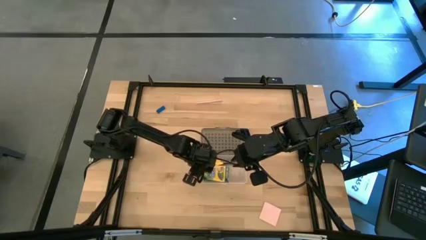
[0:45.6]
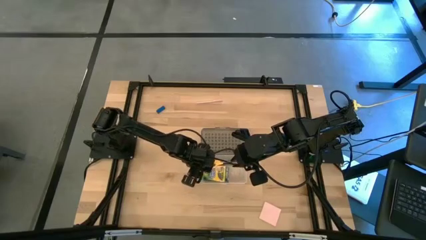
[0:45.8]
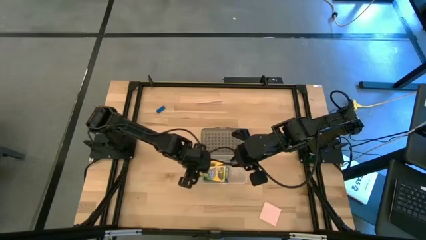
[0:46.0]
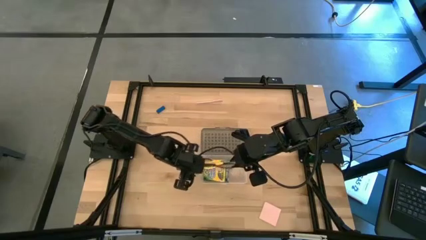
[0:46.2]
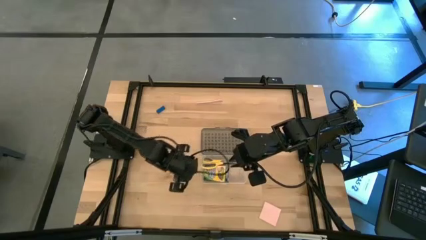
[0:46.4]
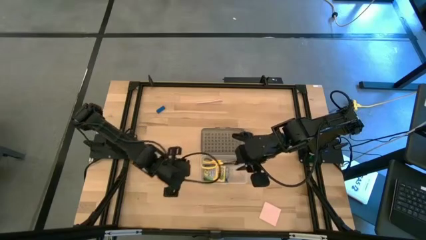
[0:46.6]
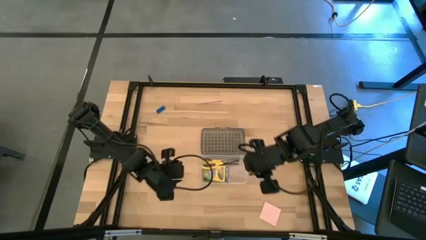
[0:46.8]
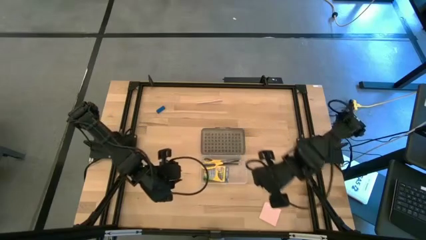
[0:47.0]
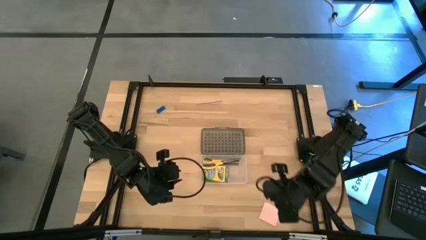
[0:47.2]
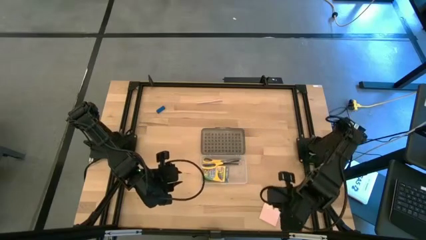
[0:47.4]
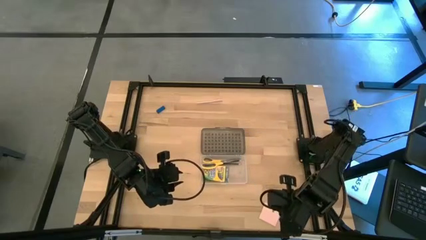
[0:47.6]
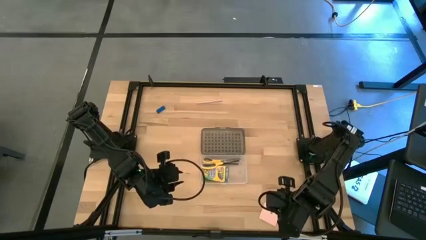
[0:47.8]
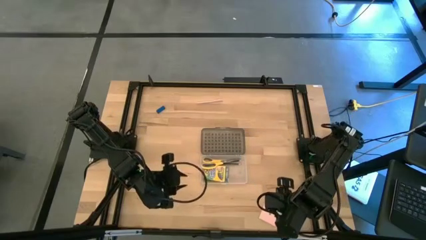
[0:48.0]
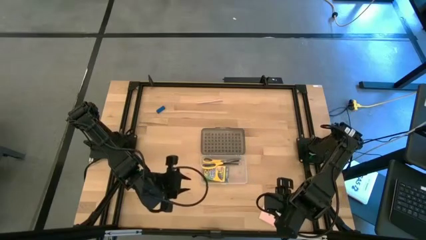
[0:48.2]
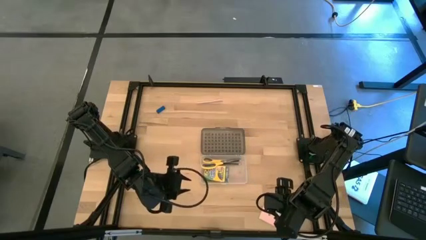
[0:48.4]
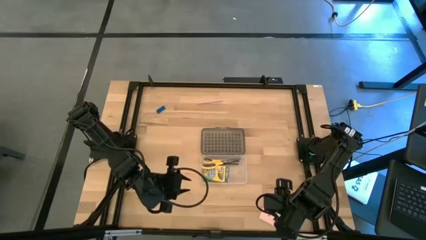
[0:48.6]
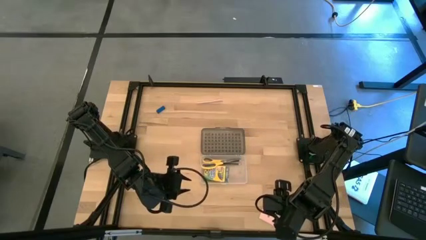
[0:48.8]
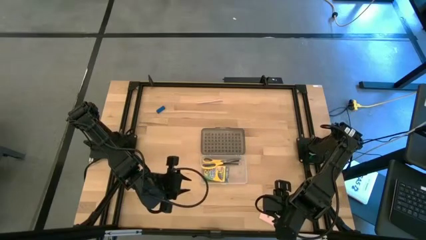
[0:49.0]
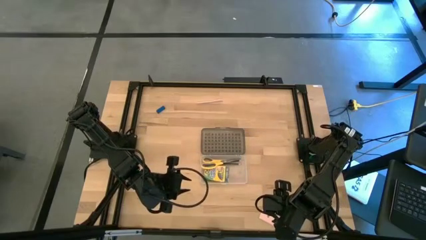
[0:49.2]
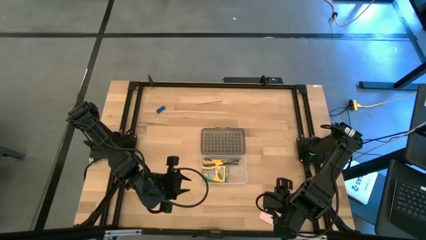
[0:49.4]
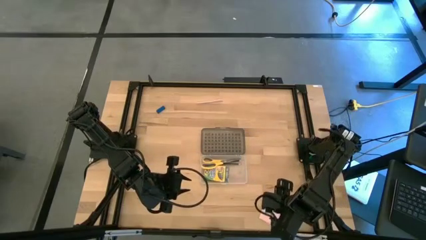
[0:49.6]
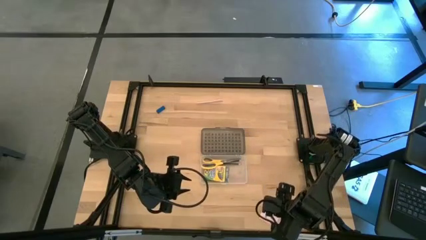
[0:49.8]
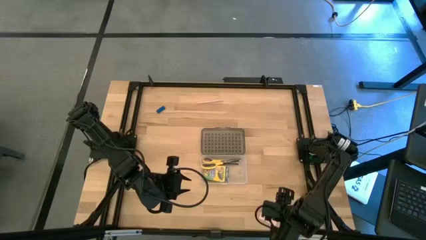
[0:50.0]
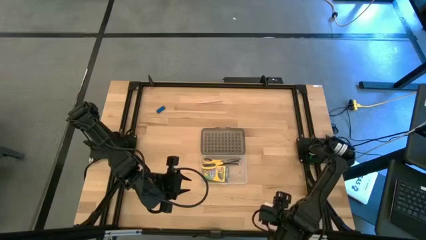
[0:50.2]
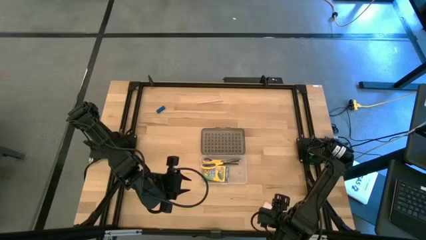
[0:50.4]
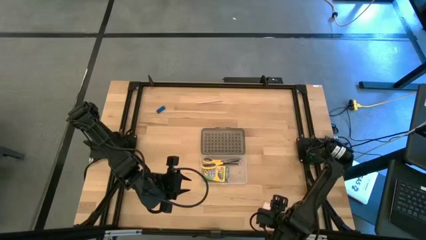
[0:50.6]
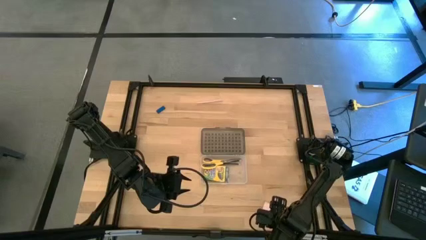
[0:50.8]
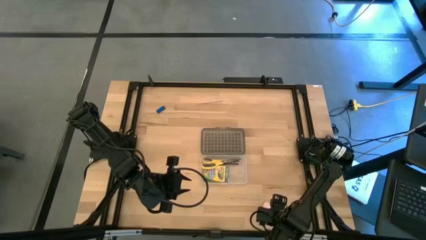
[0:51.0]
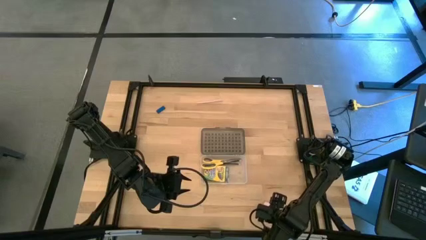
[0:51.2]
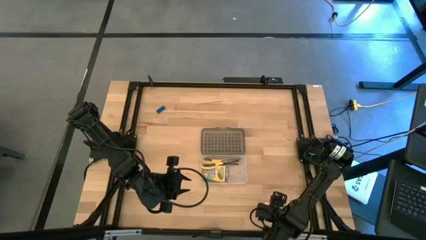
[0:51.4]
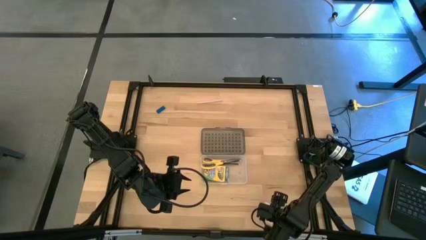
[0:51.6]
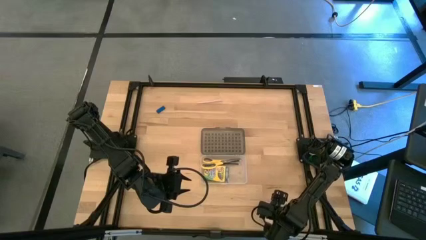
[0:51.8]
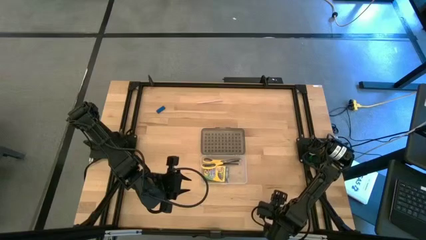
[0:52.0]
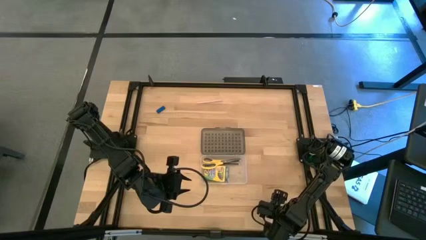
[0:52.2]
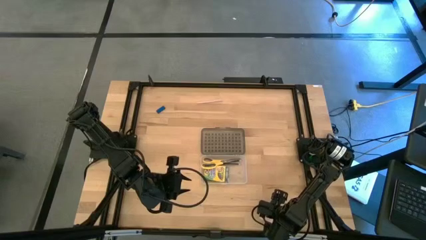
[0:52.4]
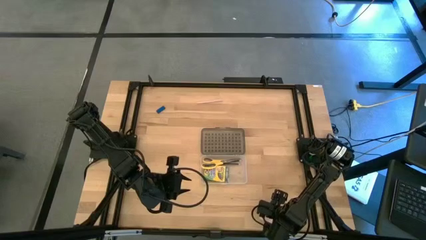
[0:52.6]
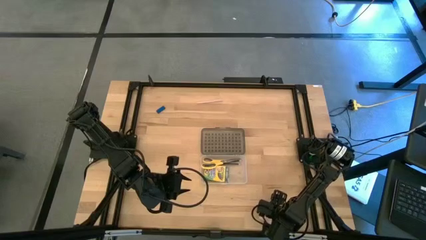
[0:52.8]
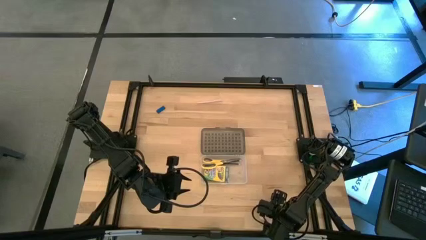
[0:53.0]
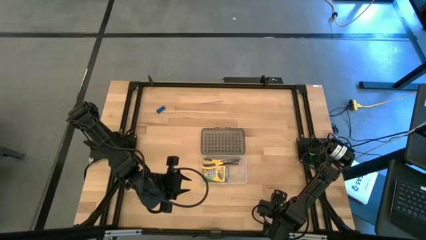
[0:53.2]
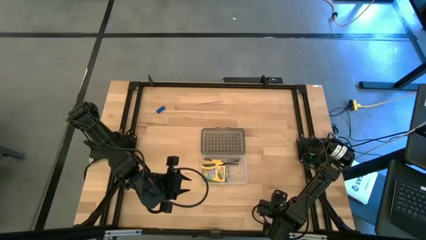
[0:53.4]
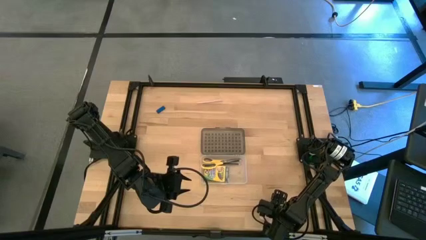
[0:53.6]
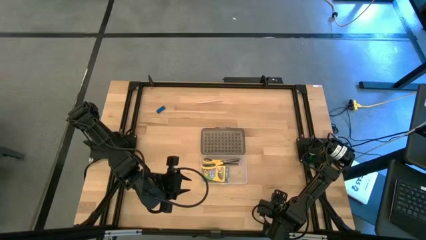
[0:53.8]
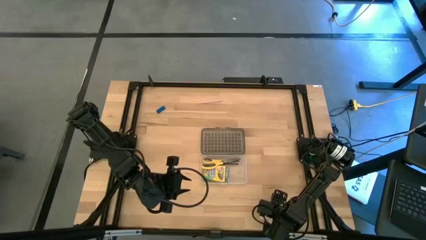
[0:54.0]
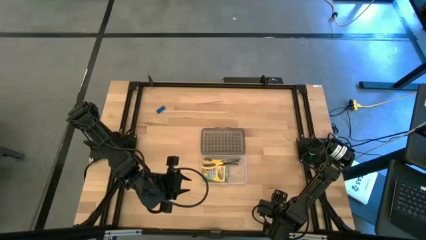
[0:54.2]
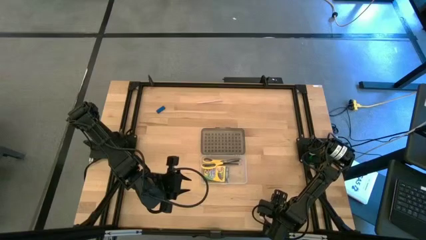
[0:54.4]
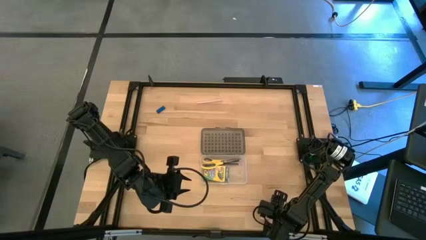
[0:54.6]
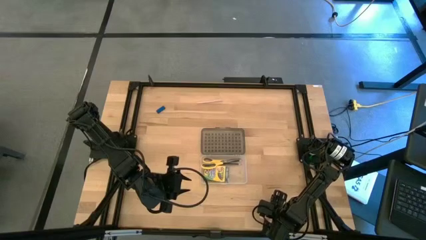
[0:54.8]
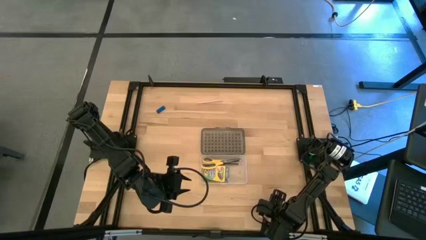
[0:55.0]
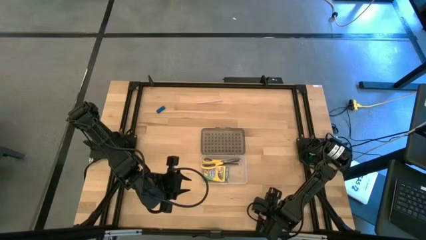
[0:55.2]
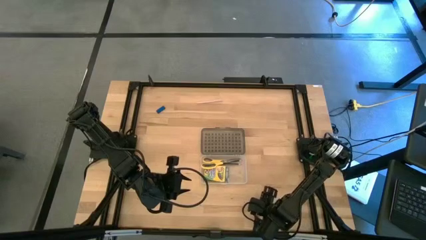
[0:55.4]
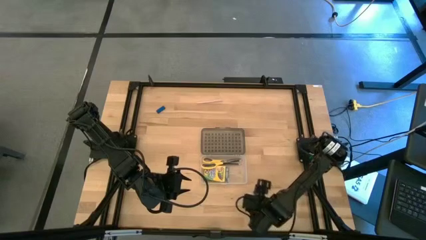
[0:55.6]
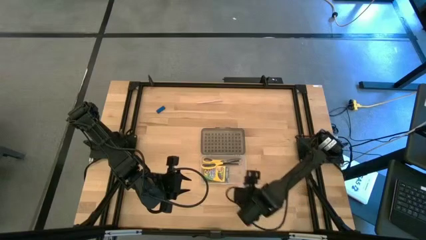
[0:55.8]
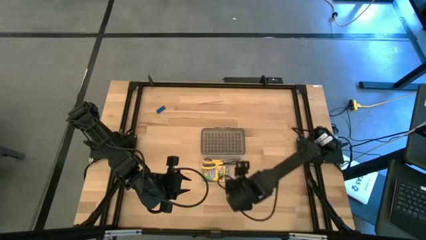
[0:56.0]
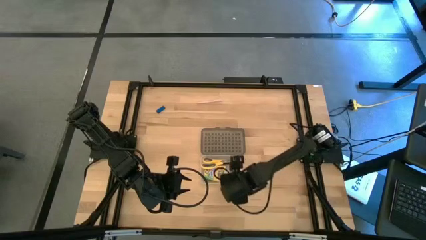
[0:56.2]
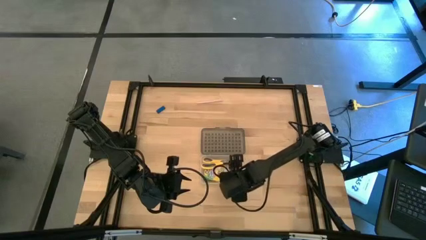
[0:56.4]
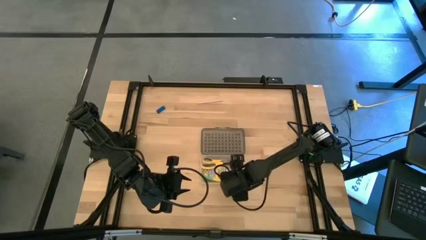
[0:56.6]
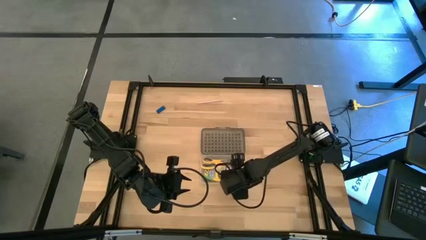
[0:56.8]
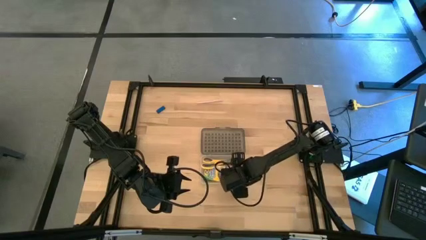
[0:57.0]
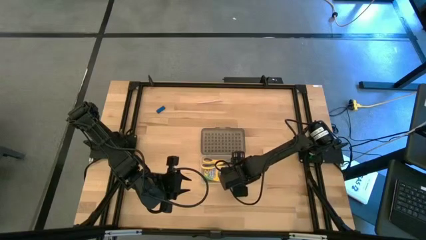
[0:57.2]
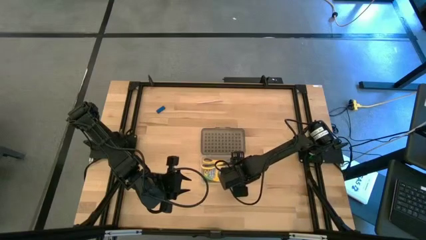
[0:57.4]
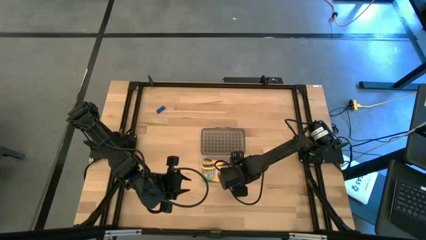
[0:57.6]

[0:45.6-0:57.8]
Task: Pack school essentials
Put the sticky note into the transparent supply box

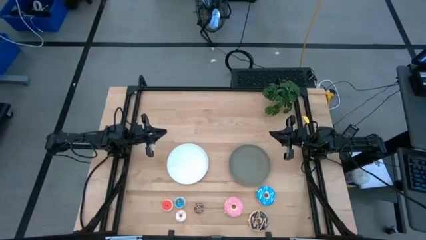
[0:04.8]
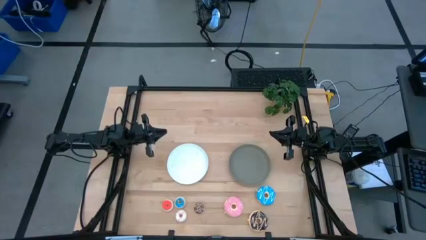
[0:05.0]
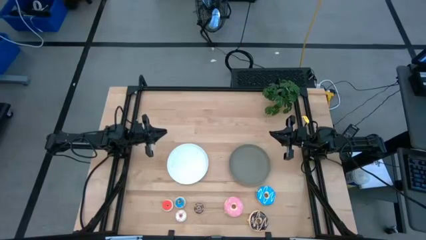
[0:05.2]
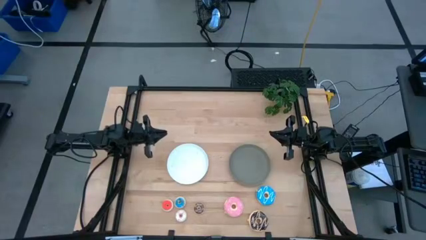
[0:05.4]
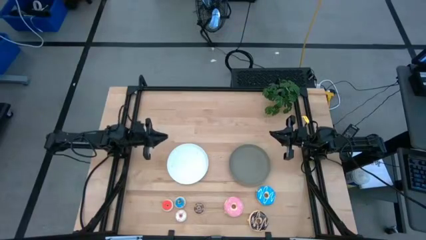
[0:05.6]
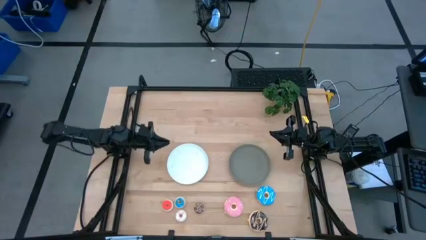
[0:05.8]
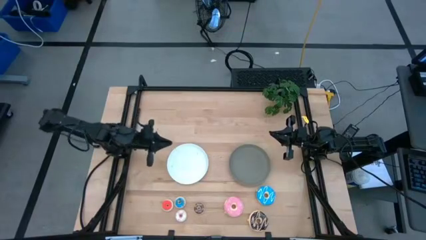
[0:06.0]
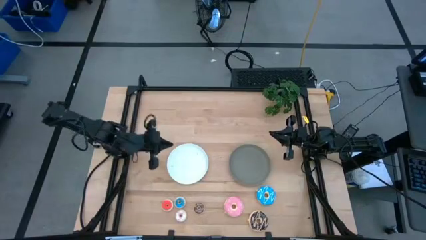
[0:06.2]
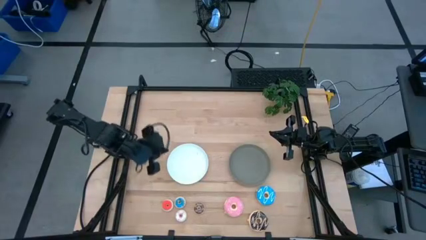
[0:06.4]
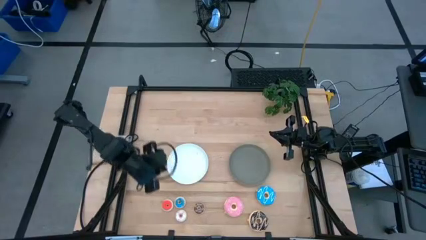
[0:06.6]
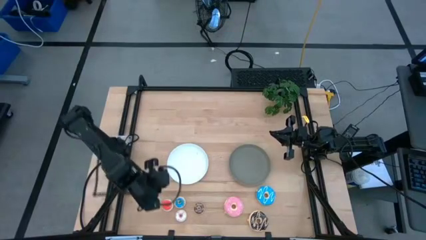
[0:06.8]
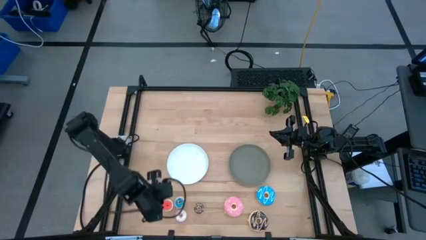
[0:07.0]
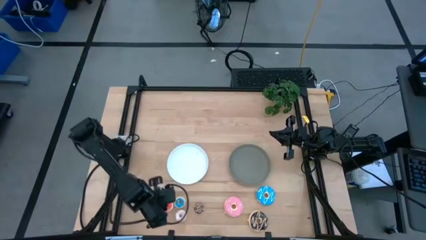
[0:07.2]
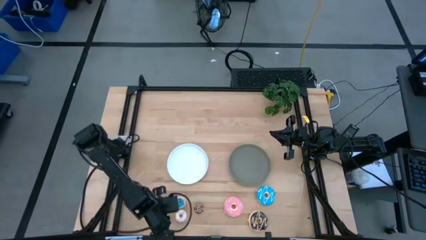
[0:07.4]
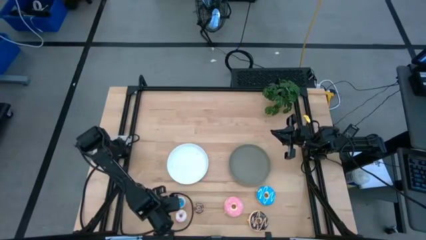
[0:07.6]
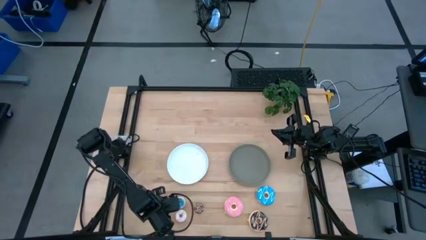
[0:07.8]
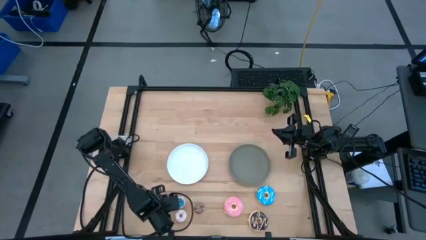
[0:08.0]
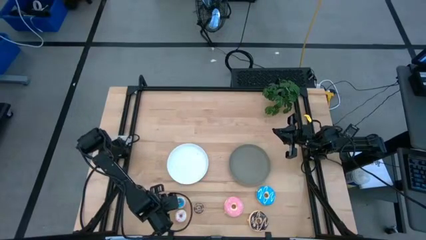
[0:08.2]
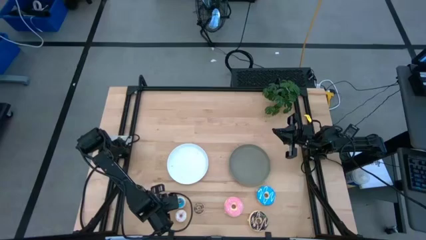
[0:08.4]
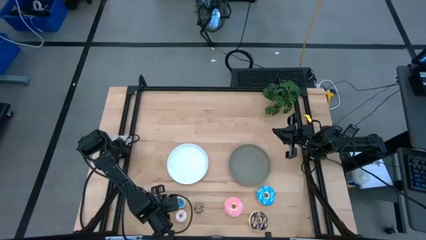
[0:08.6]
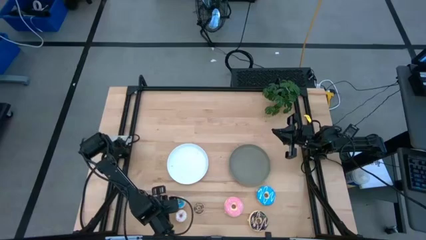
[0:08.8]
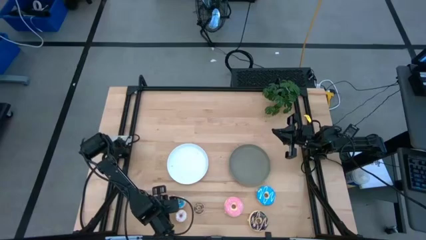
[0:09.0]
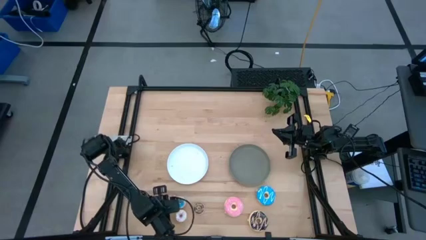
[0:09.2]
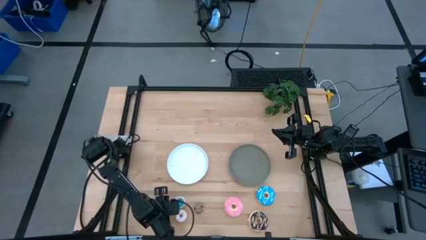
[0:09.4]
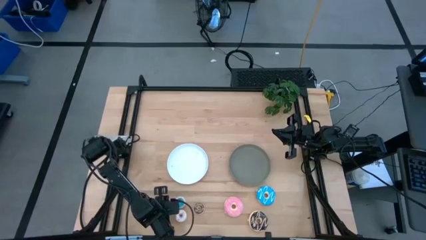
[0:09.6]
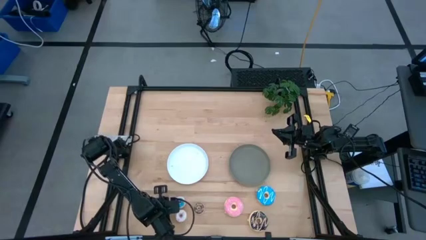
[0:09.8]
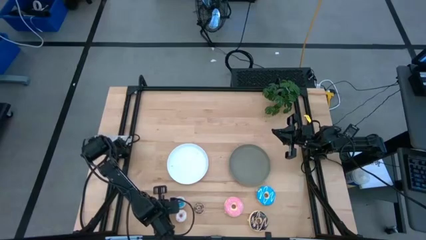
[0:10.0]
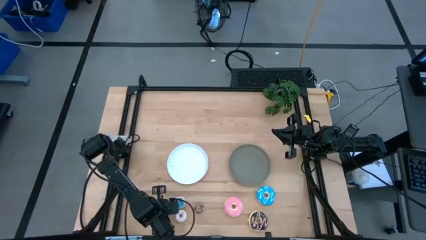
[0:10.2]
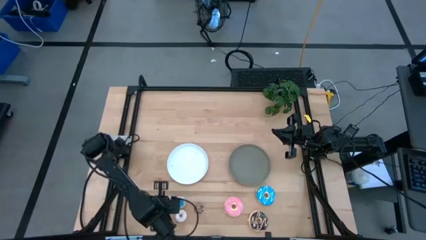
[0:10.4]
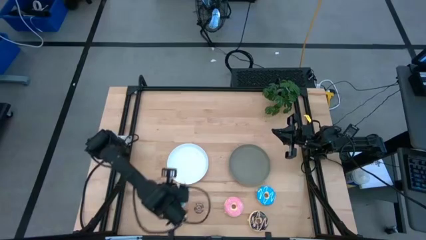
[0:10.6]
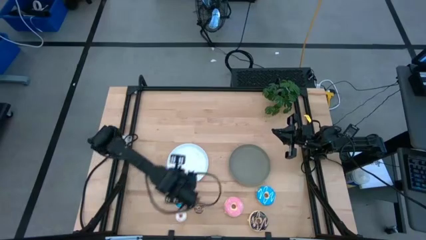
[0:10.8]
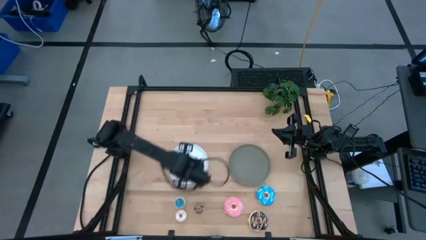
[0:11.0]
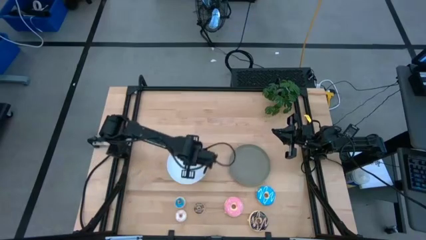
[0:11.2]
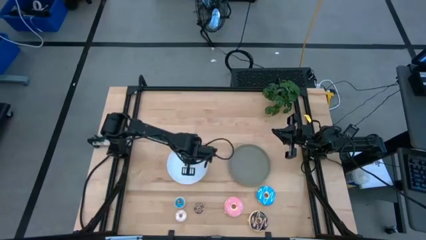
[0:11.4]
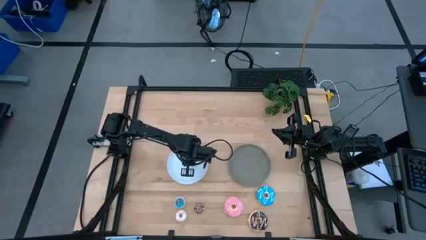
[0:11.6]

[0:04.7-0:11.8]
Task: Pick & Place donuts
Put the small red donut on the white plate
